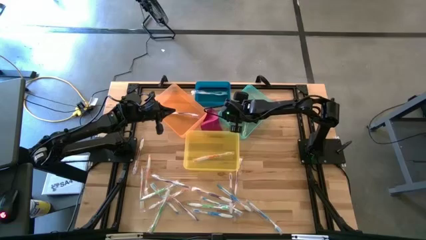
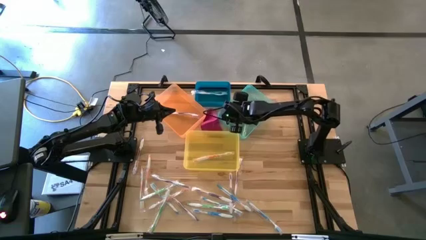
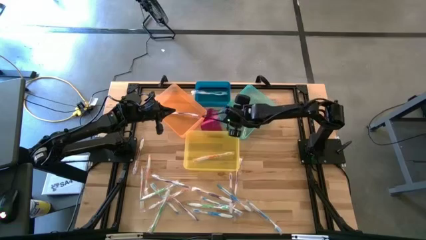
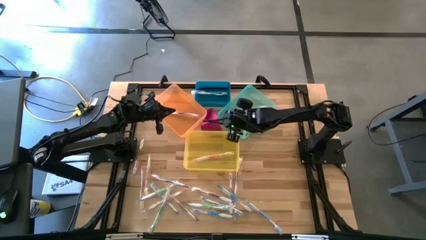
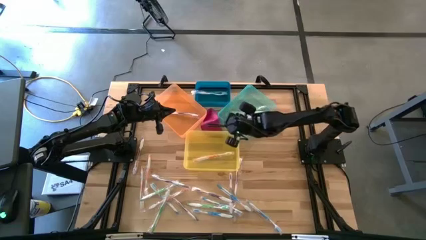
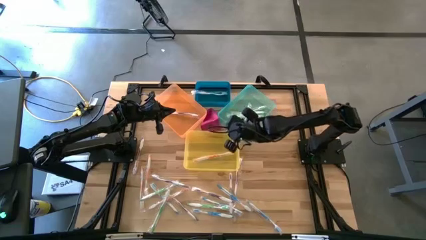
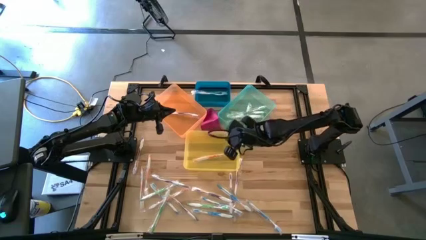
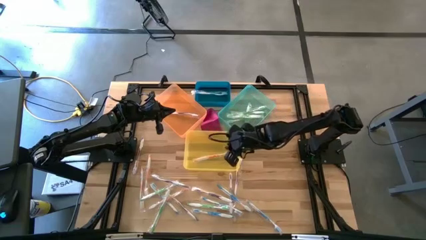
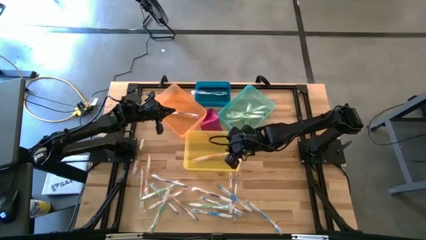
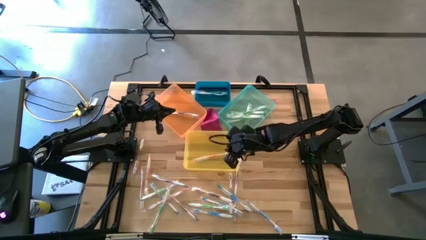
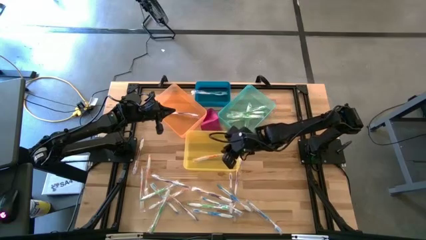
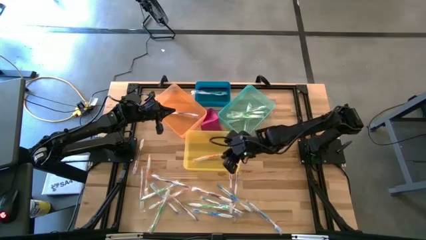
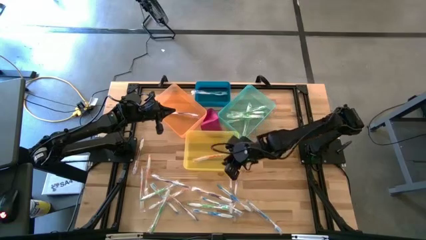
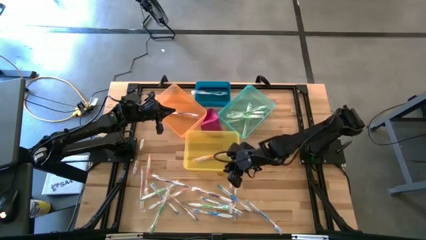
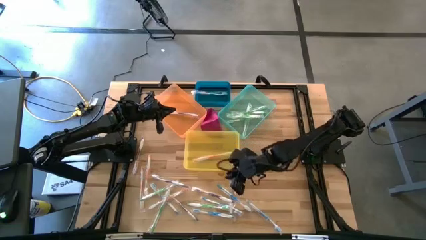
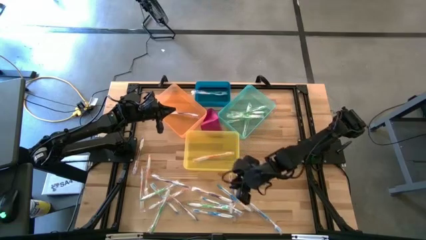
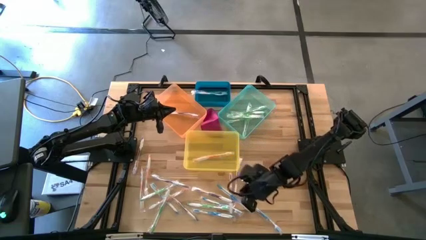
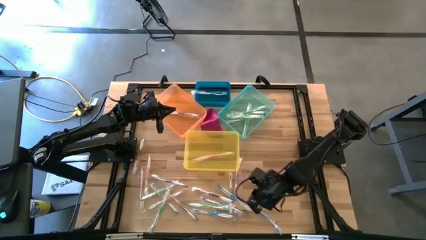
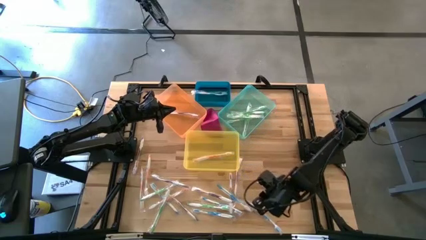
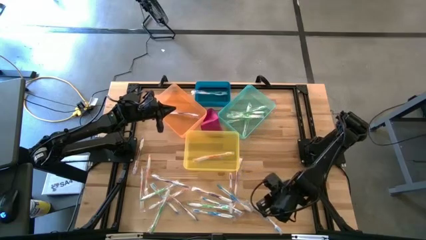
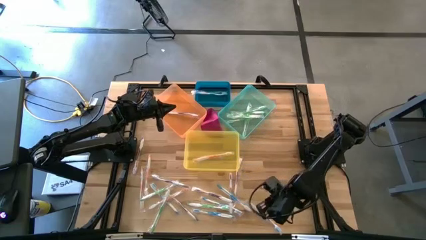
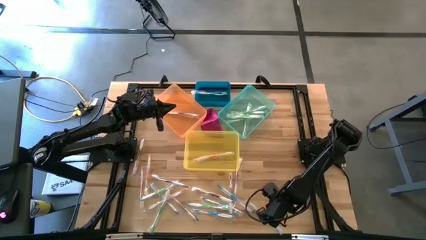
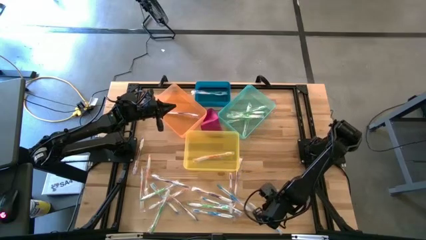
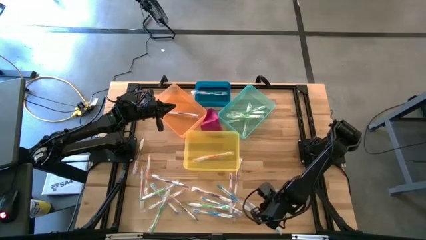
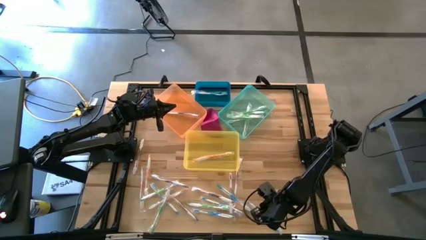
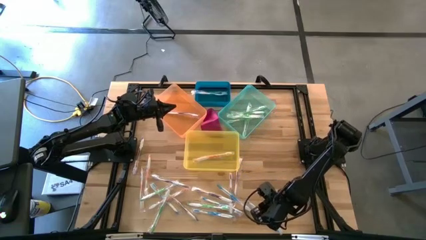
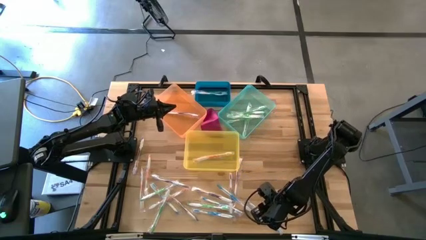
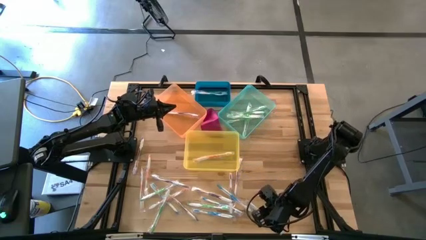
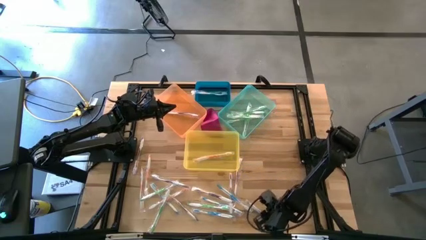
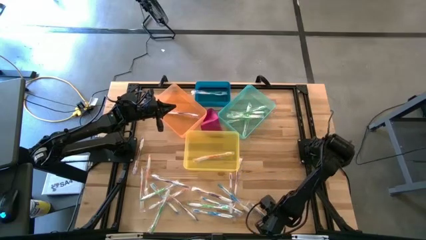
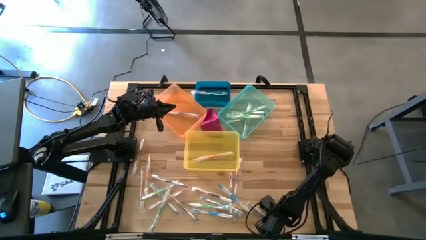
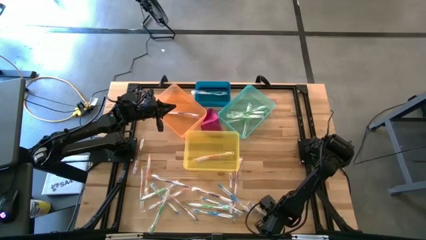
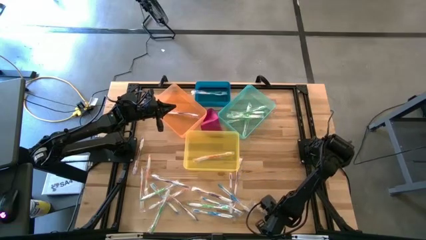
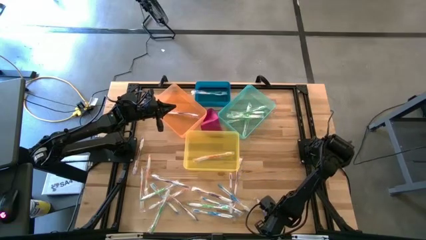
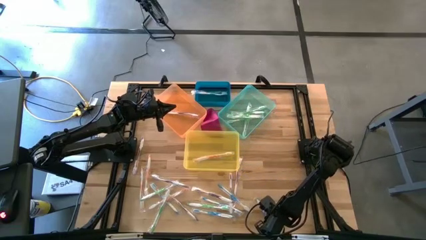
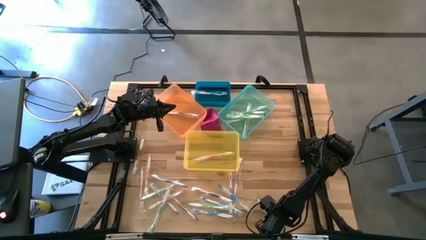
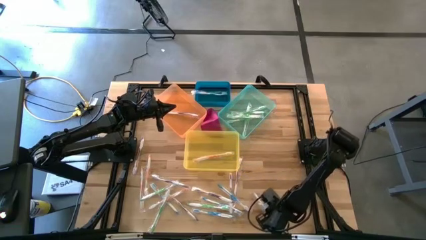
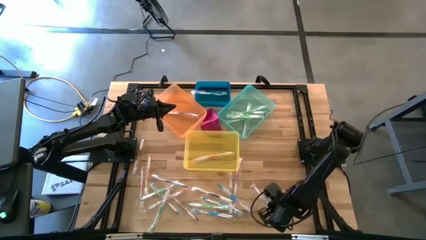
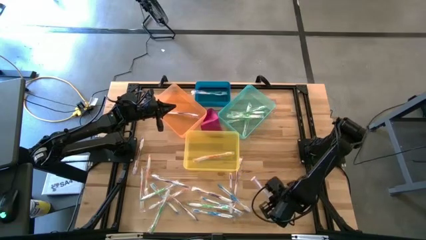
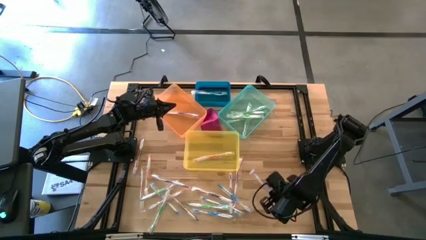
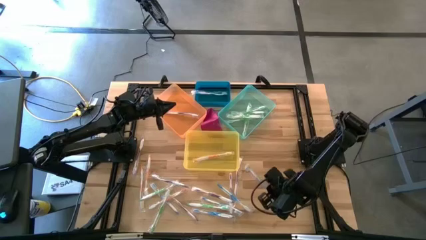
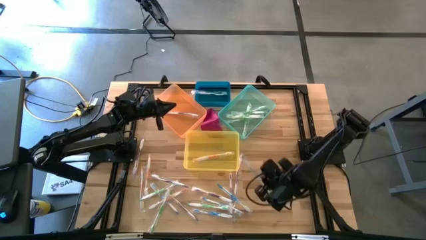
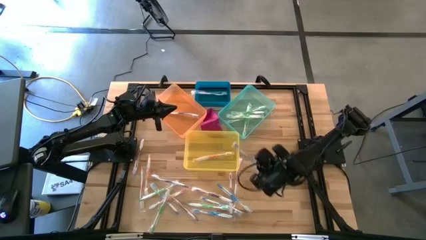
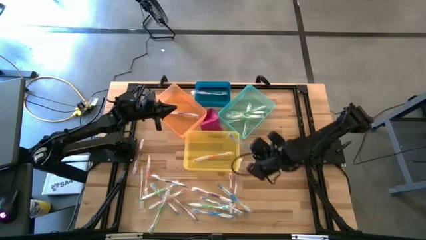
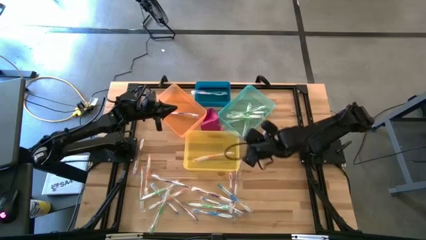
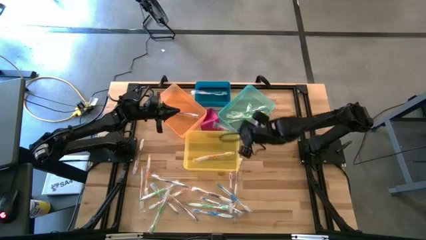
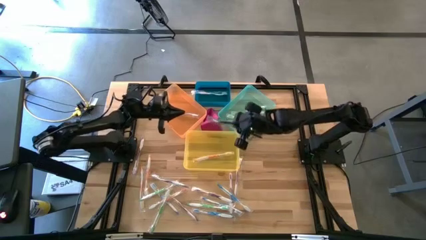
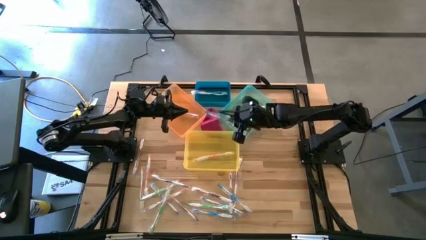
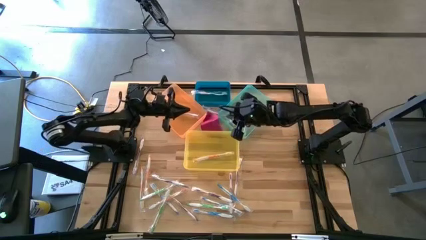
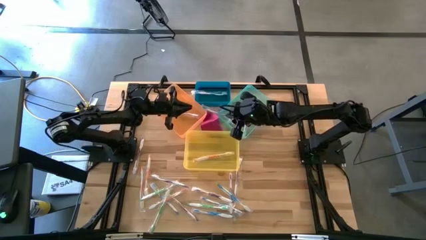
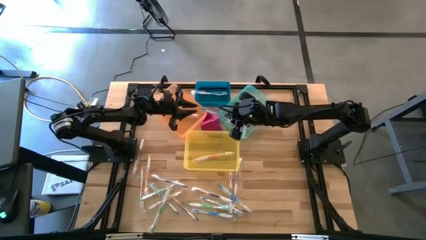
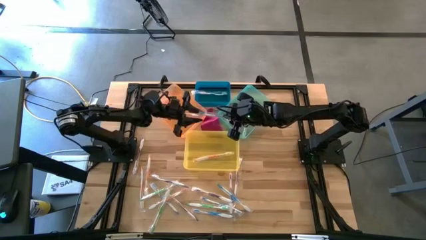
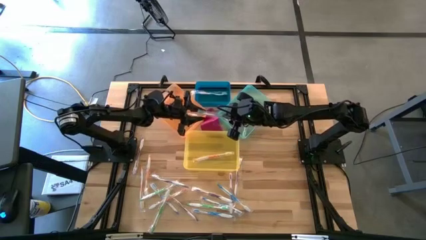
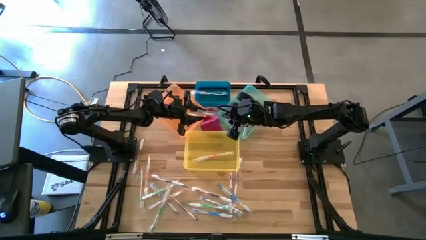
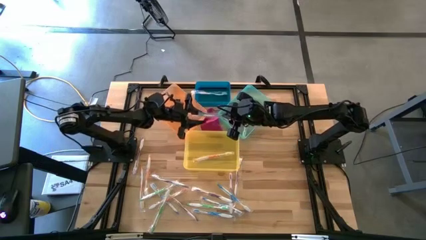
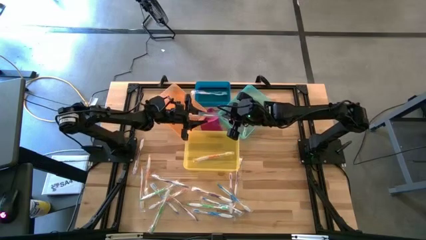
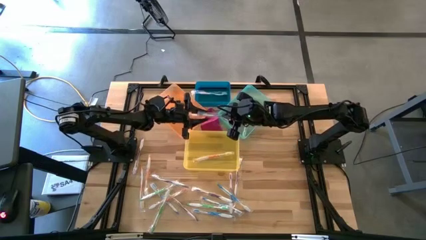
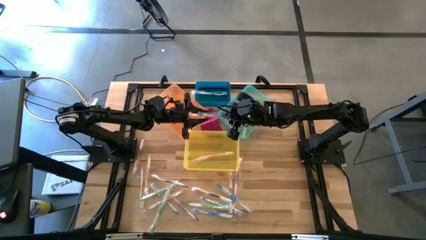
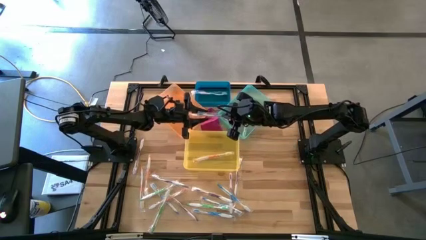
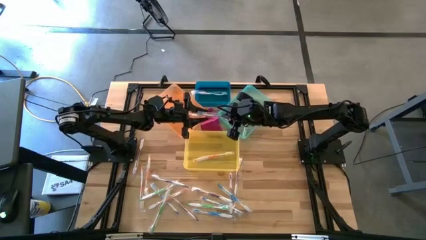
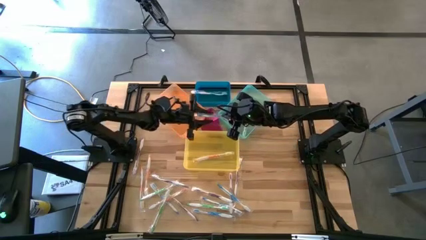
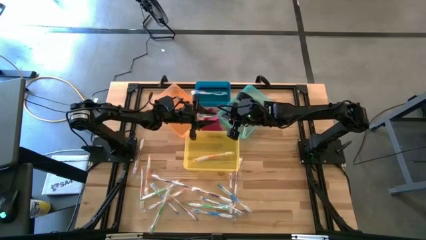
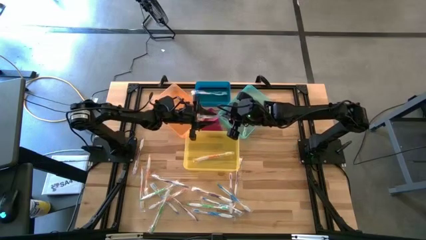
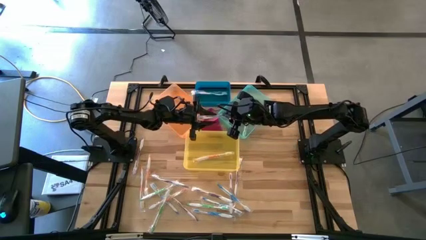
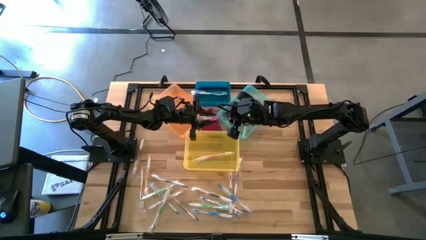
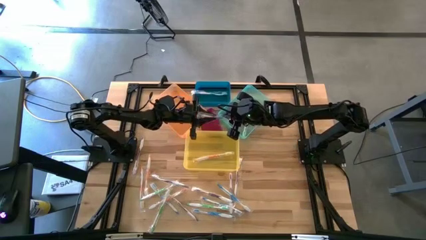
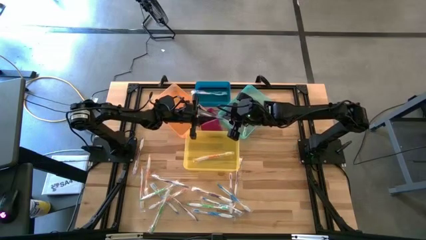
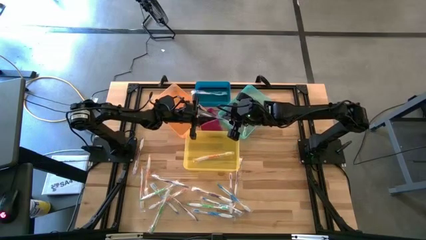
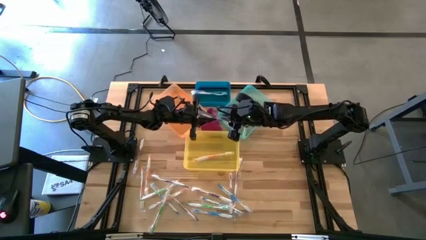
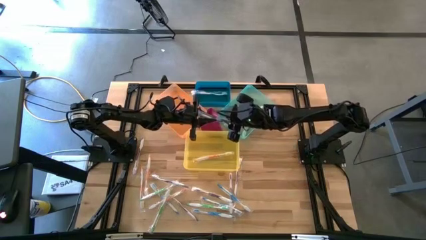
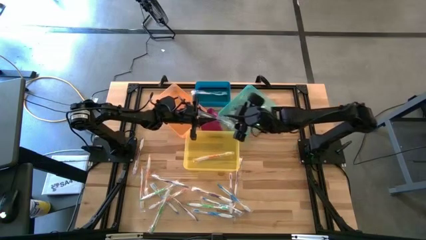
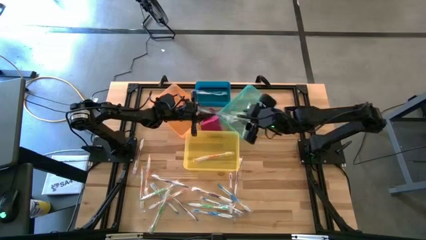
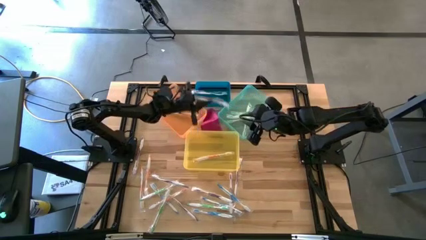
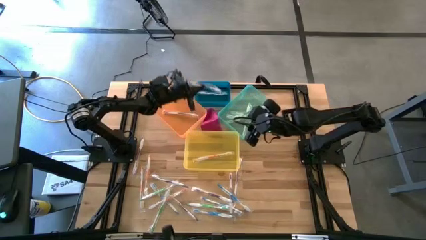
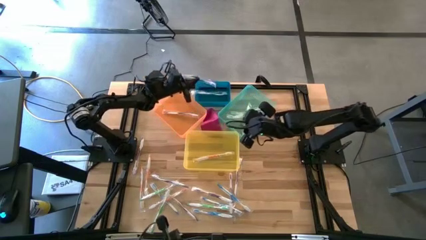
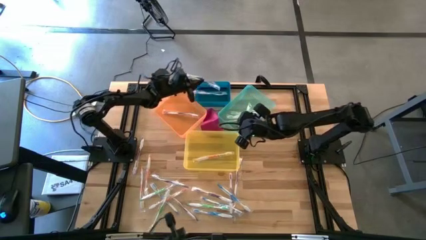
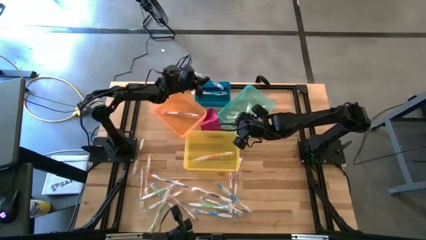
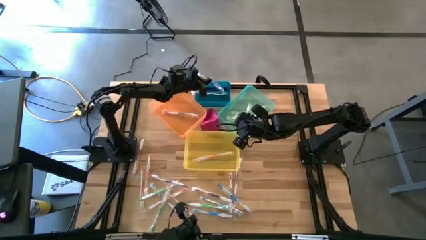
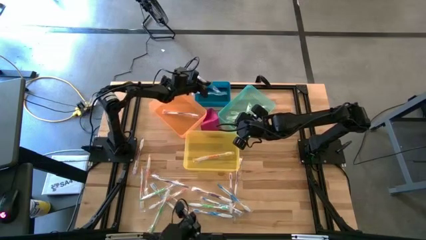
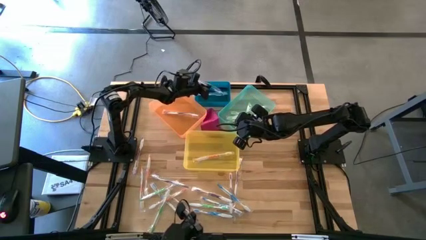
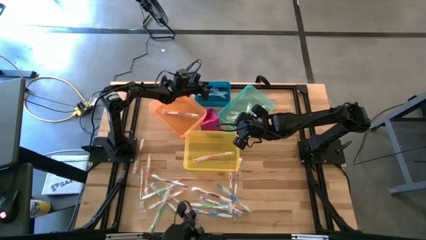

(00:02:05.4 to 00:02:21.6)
Task: Pick & Place Toothbrushes
Put the blue toothbrush into the blue bin
